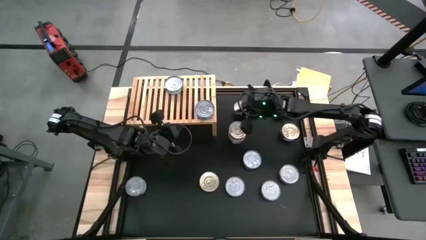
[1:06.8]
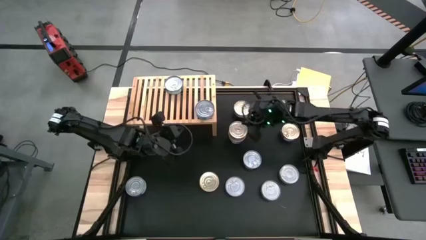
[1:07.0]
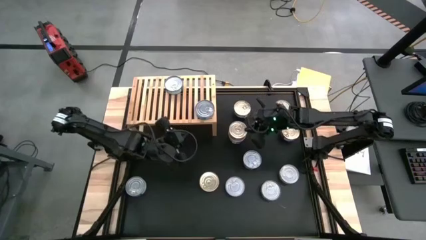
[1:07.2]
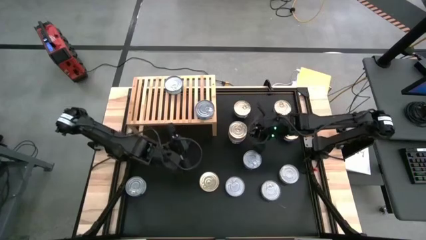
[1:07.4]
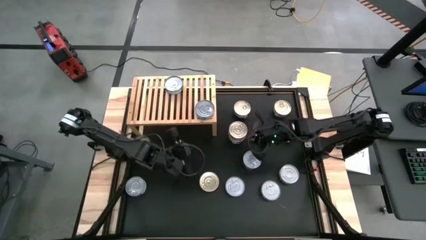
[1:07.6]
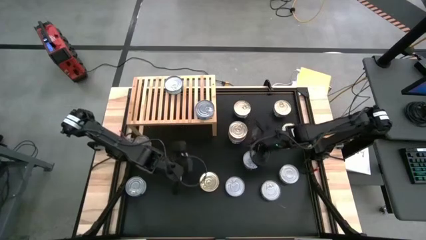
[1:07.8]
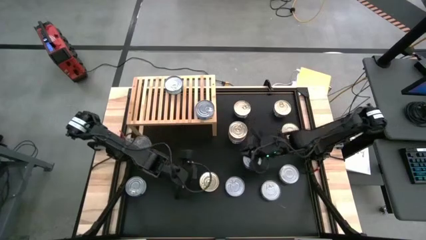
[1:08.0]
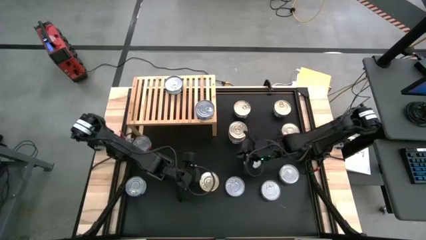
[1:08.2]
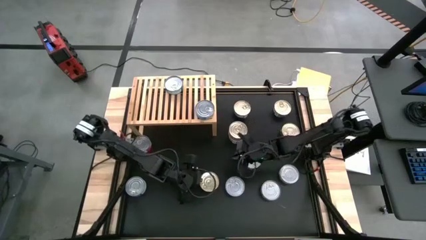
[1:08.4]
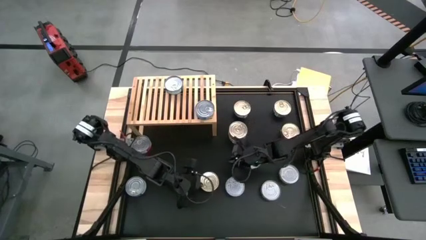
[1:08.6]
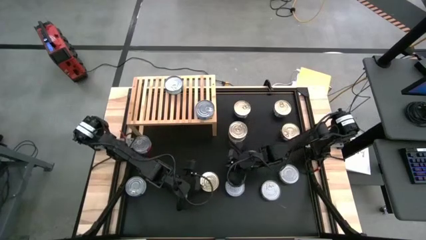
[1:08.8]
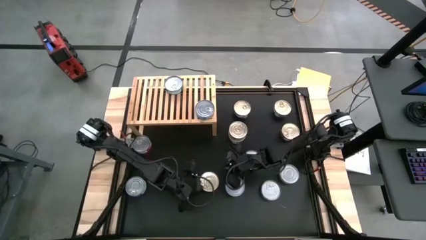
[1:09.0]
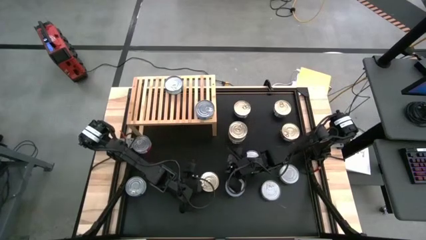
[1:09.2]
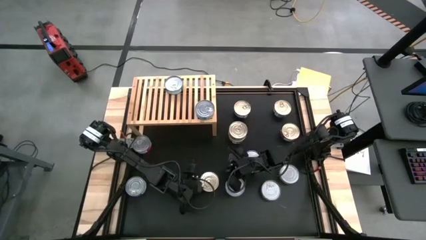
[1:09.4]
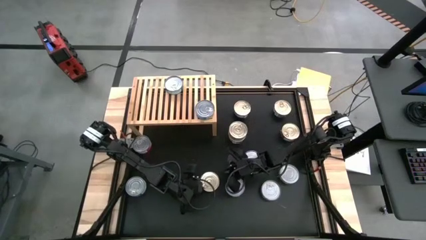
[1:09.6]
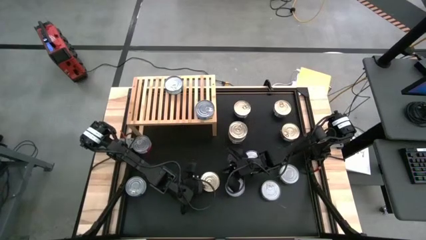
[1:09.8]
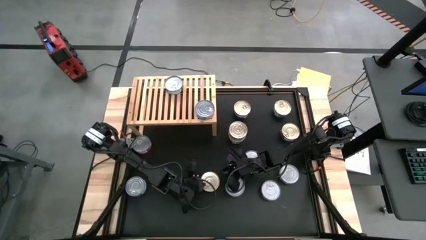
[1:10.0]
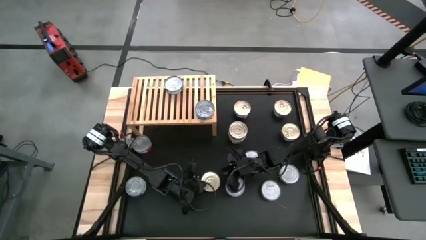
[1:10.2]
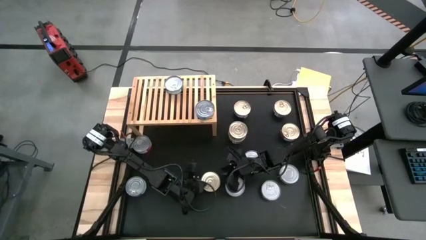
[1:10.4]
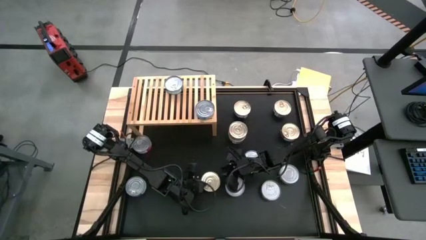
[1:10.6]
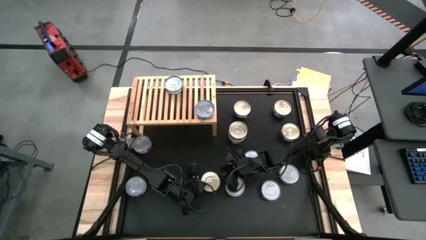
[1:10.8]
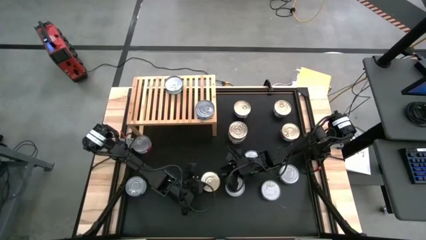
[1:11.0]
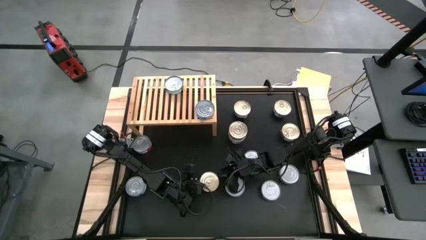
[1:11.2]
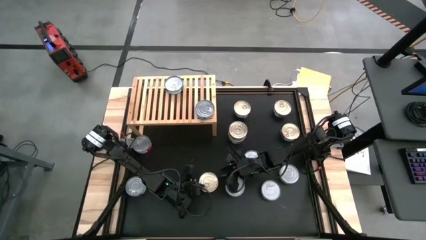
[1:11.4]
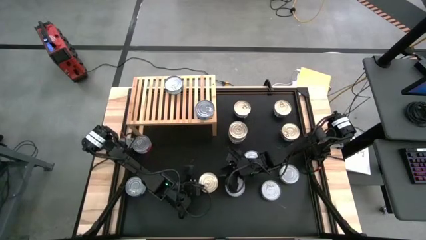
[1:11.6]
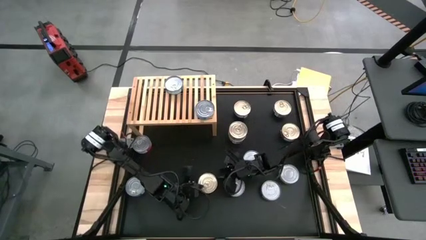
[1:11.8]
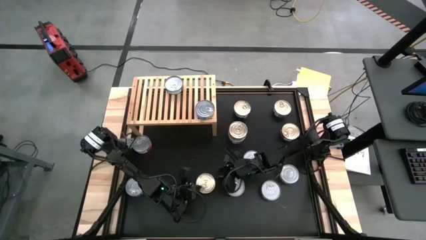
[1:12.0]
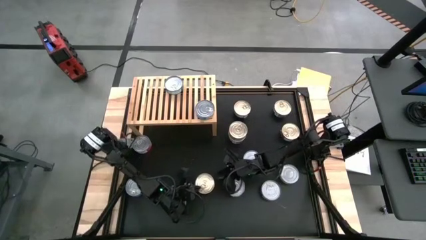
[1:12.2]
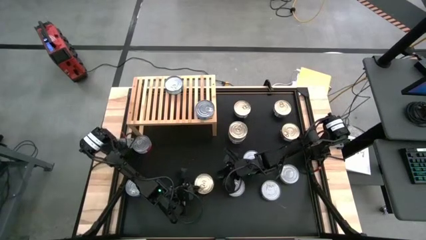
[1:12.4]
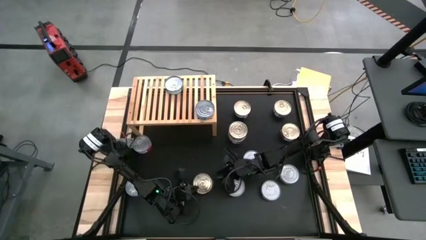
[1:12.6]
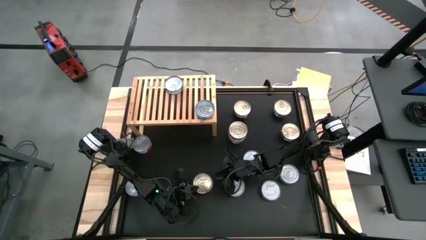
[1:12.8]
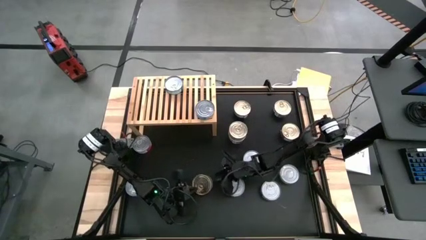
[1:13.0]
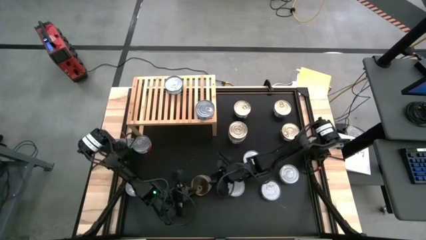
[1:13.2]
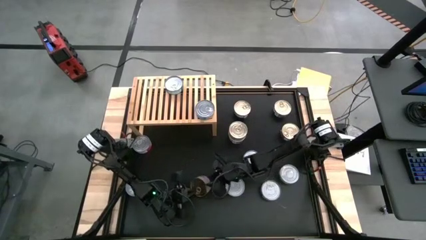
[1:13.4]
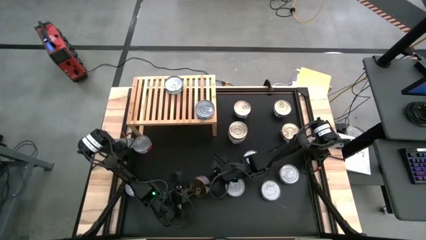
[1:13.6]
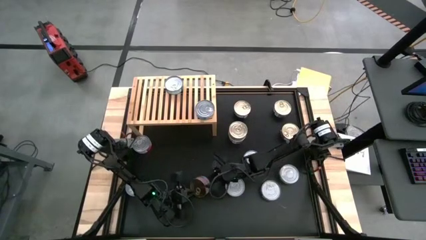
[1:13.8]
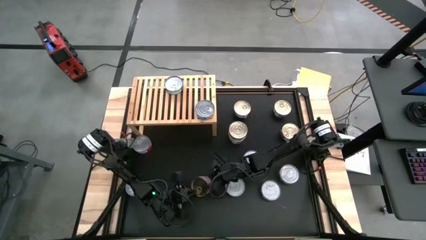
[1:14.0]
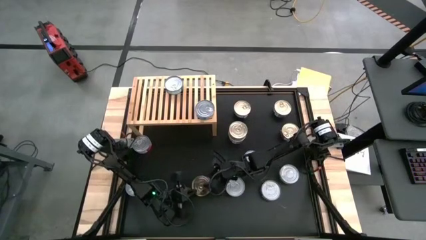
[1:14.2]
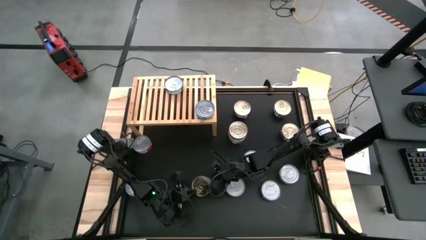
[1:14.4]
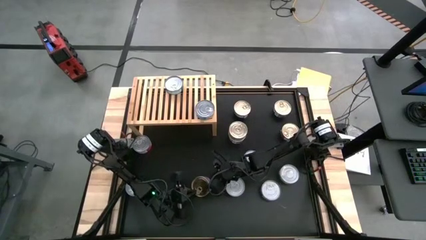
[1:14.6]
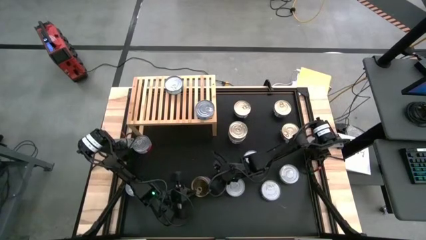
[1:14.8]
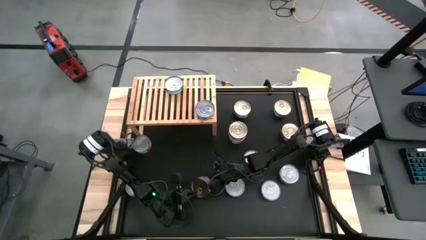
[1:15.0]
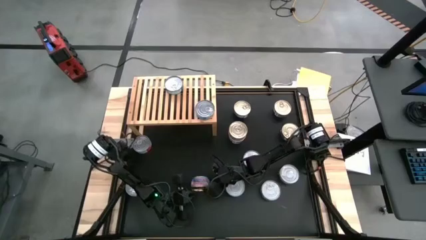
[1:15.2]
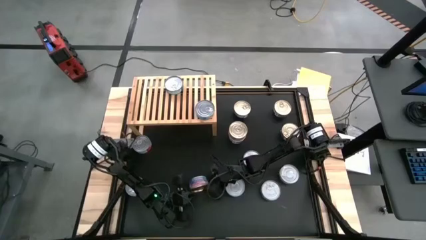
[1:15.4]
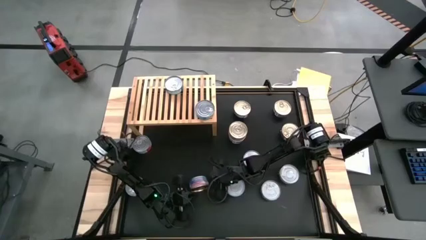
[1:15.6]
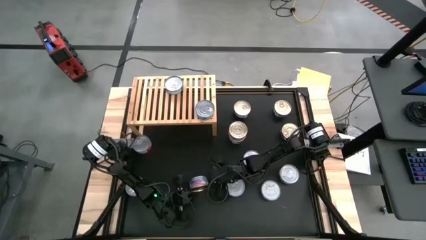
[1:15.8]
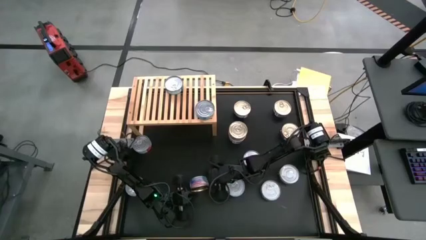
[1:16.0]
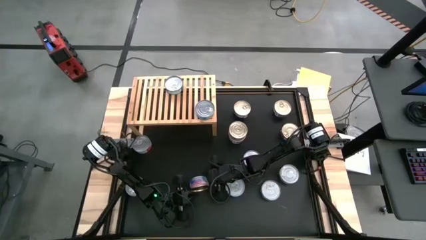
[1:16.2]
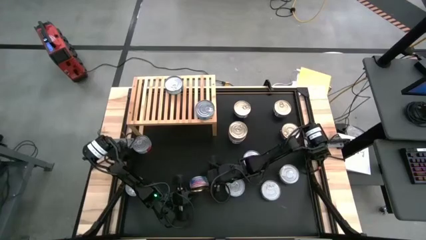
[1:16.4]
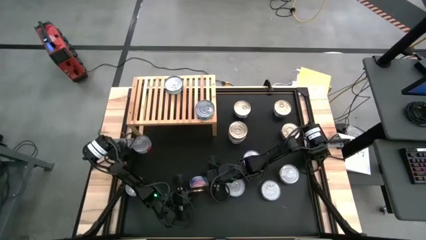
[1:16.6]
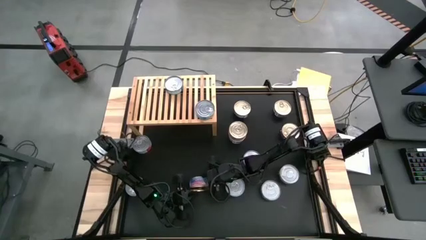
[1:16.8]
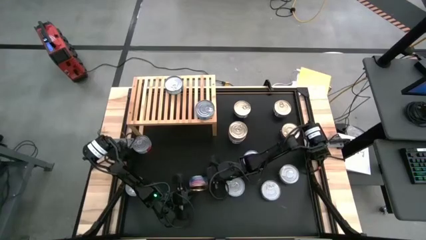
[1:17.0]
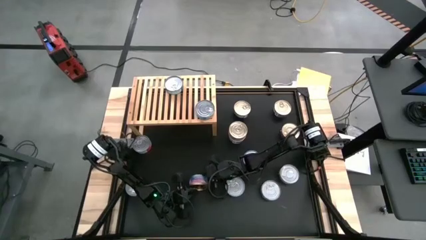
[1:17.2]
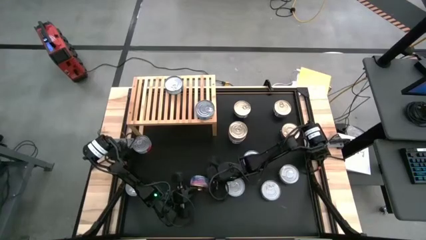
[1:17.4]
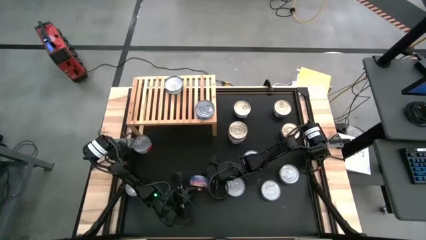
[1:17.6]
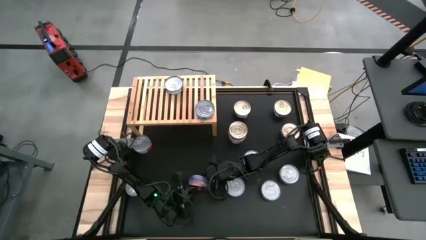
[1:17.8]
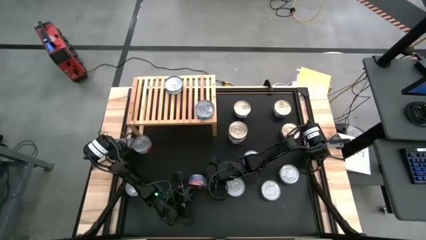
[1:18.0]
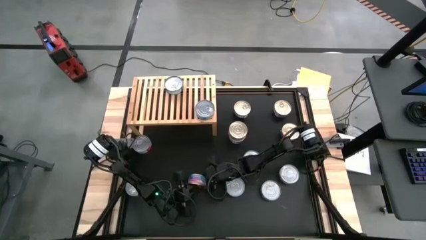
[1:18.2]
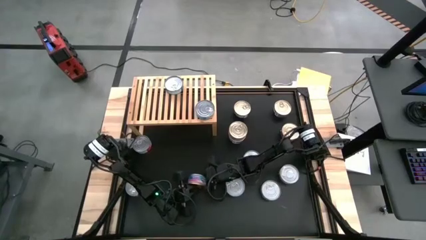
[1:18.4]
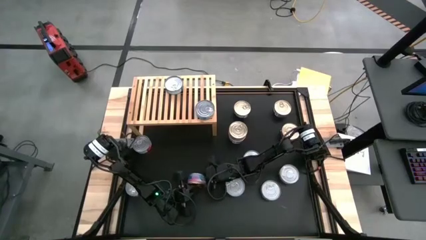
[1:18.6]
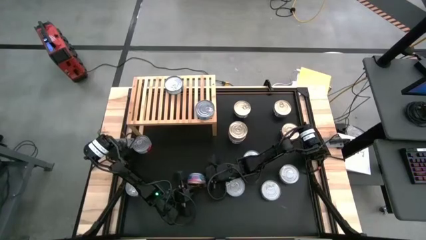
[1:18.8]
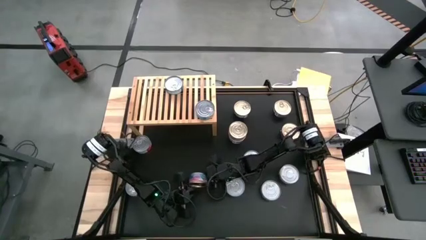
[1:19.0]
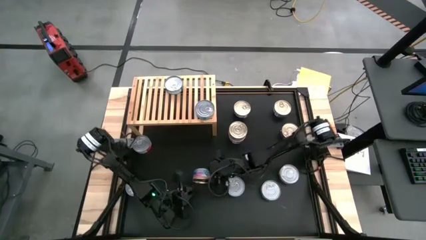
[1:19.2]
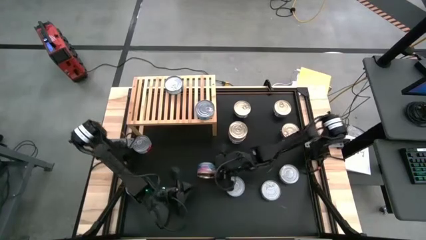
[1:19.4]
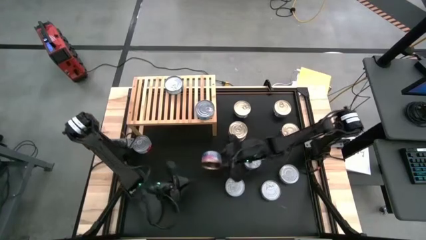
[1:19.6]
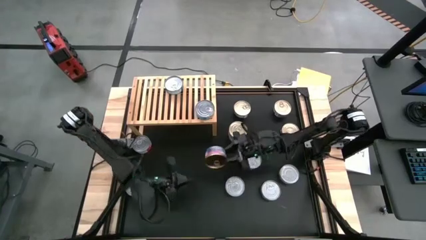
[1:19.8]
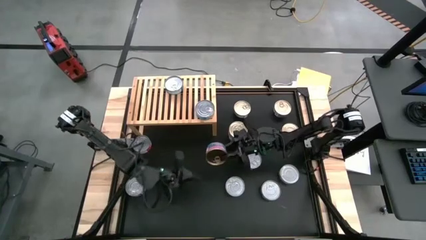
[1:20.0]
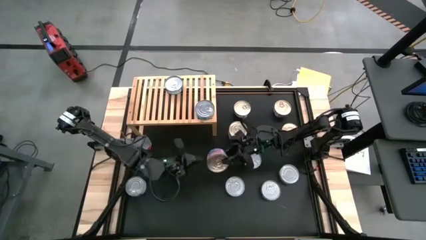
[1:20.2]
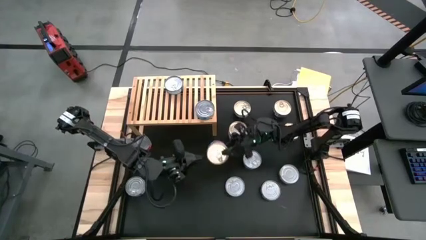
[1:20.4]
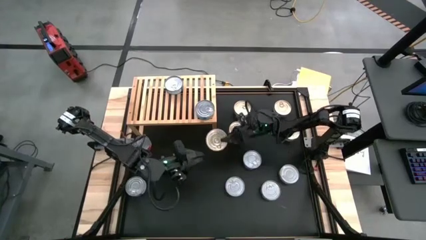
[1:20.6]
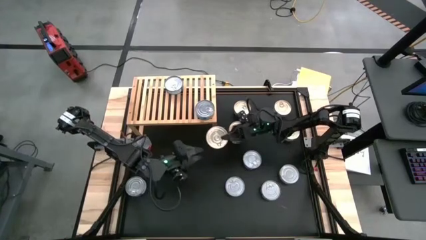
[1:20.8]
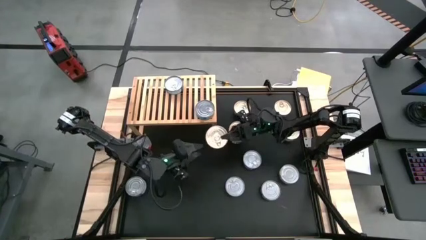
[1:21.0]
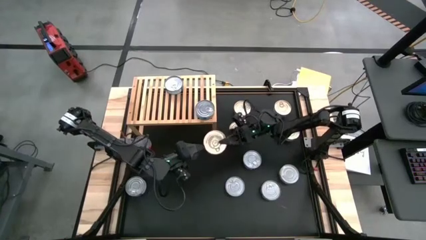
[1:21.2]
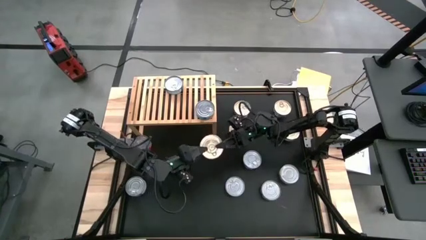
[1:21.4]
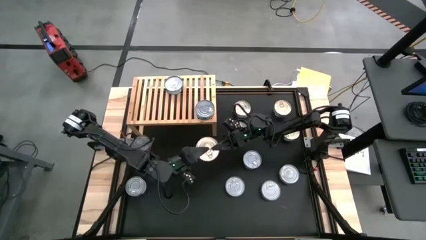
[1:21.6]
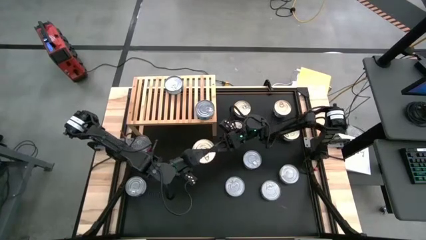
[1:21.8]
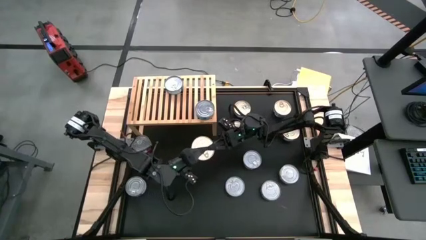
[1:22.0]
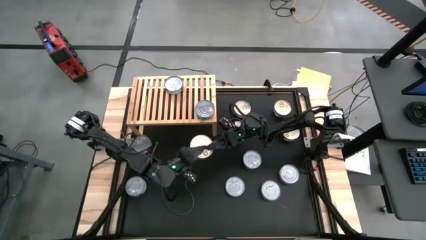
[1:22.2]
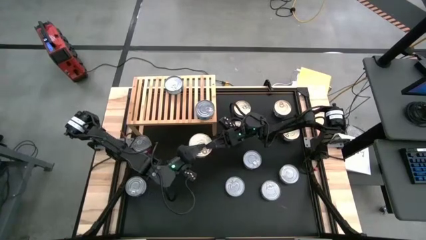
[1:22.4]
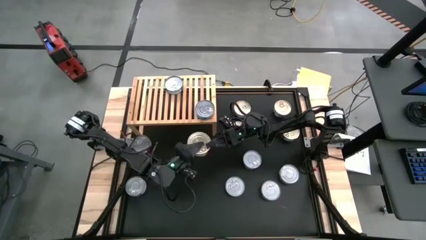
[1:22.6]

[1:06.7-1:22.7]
Task: Stack canned seafood by type on shelf
Put the blue pink tuna can on the shelf
